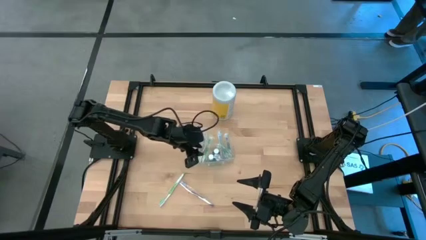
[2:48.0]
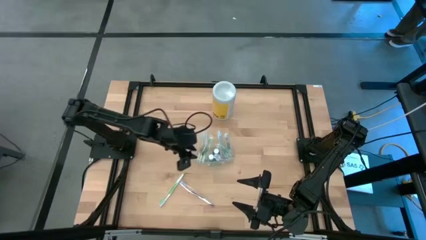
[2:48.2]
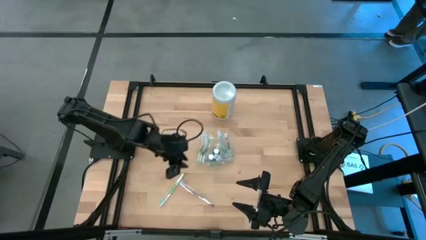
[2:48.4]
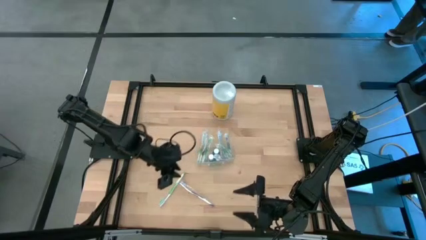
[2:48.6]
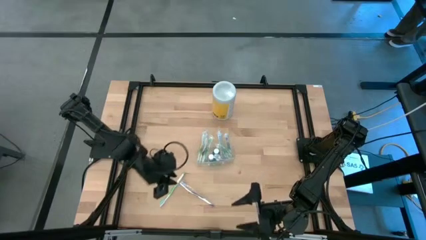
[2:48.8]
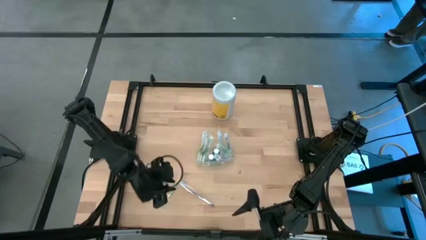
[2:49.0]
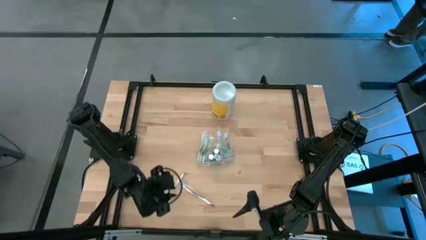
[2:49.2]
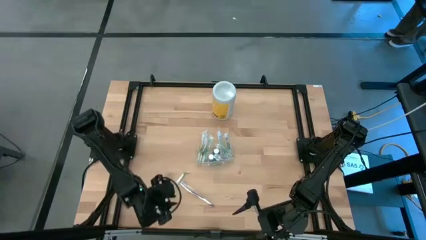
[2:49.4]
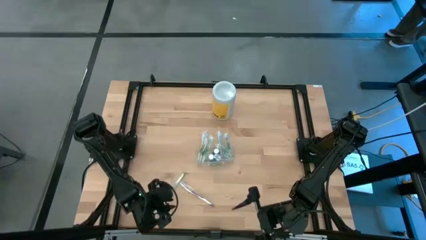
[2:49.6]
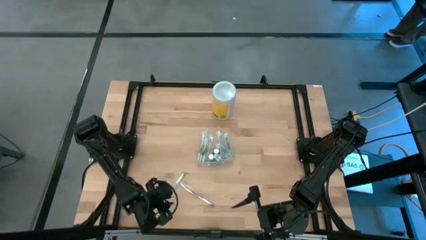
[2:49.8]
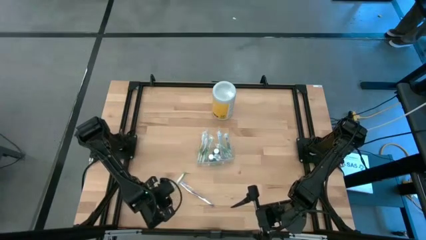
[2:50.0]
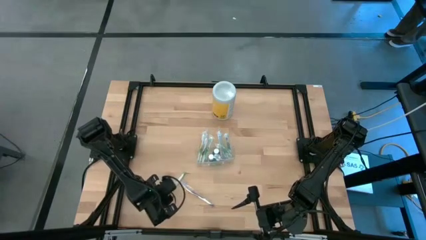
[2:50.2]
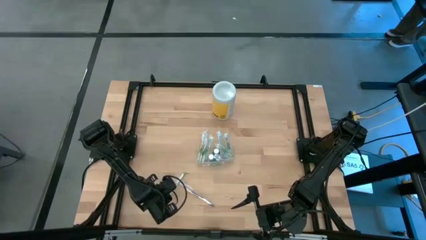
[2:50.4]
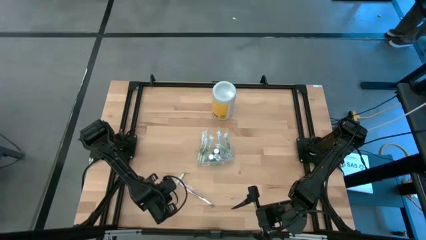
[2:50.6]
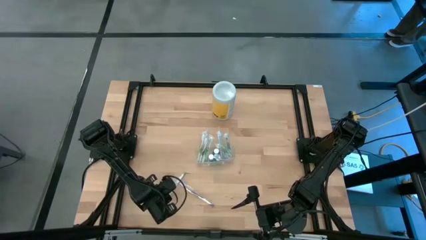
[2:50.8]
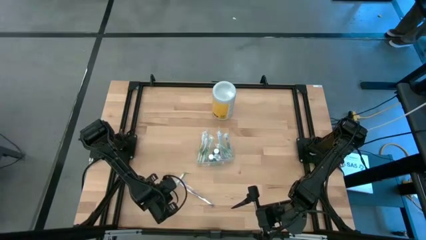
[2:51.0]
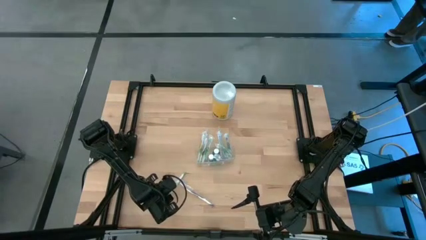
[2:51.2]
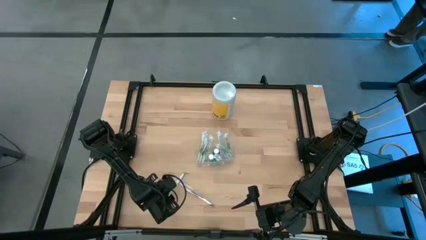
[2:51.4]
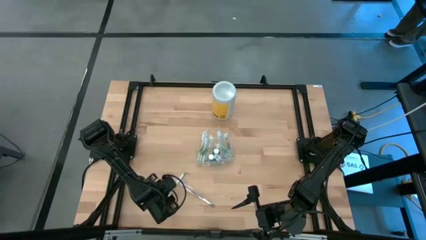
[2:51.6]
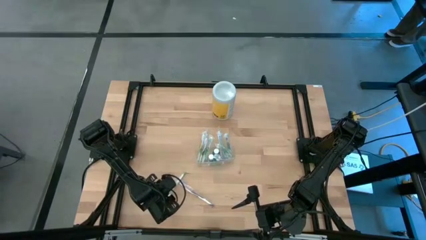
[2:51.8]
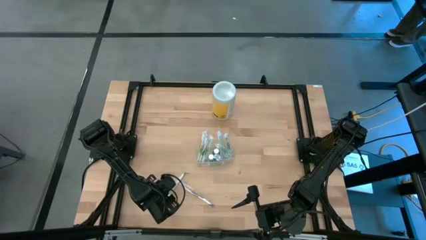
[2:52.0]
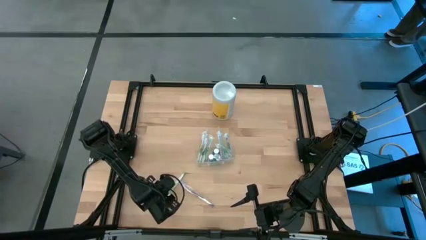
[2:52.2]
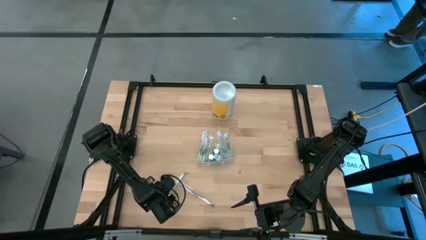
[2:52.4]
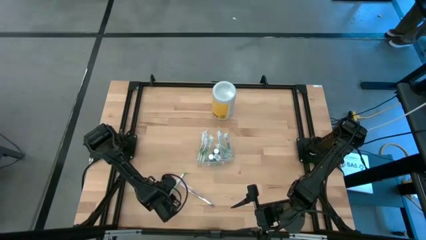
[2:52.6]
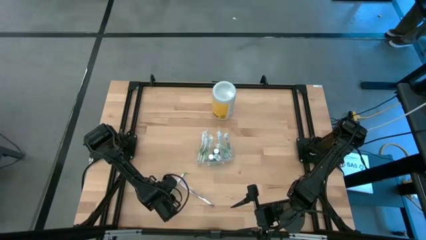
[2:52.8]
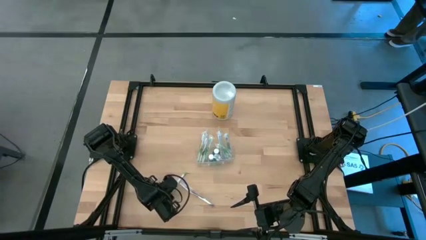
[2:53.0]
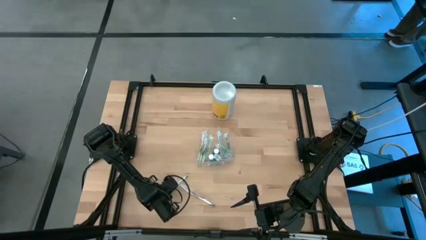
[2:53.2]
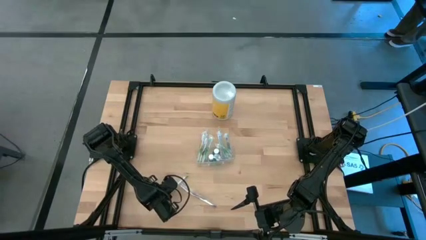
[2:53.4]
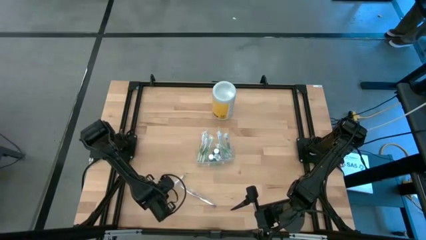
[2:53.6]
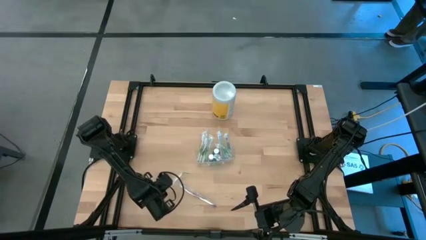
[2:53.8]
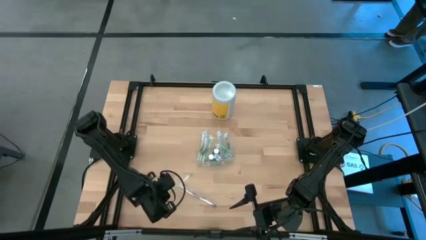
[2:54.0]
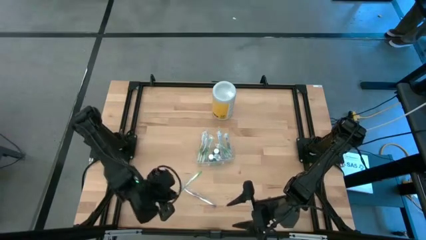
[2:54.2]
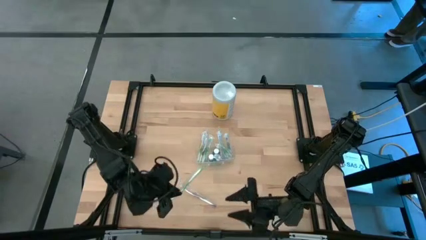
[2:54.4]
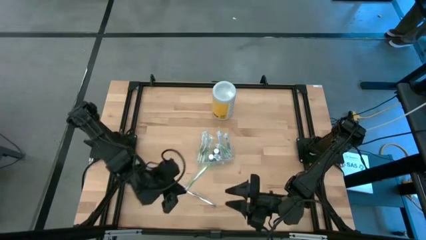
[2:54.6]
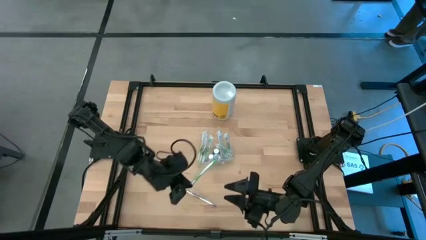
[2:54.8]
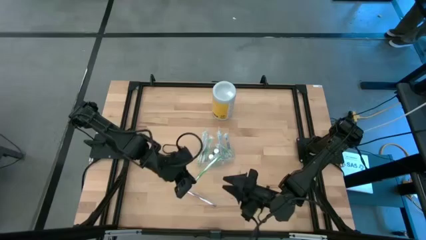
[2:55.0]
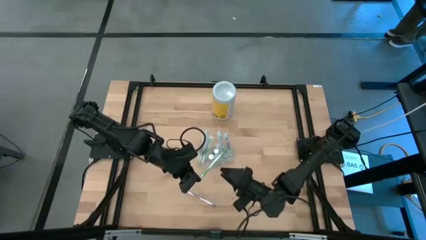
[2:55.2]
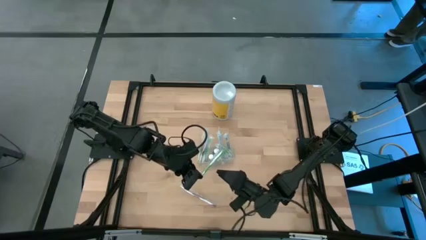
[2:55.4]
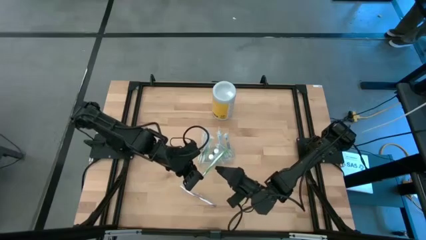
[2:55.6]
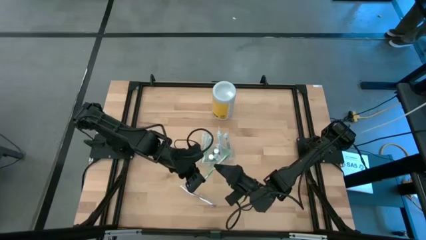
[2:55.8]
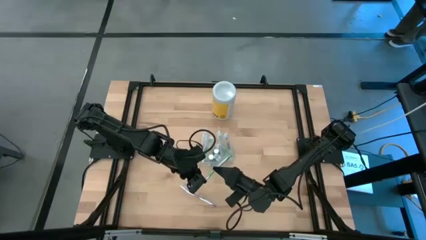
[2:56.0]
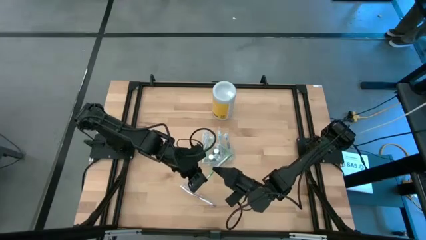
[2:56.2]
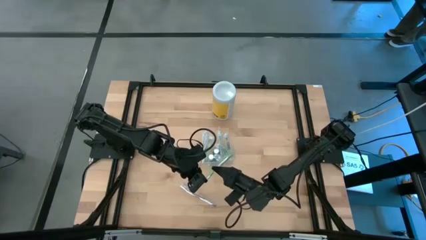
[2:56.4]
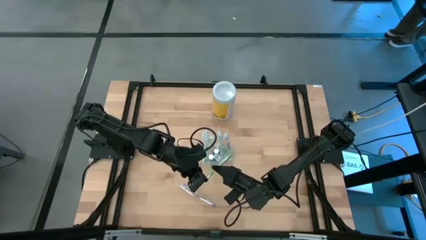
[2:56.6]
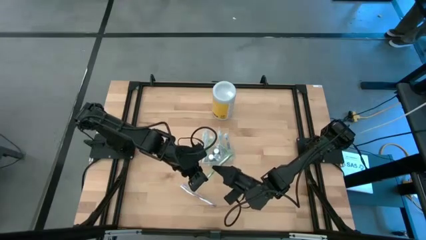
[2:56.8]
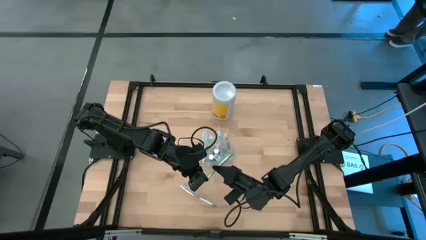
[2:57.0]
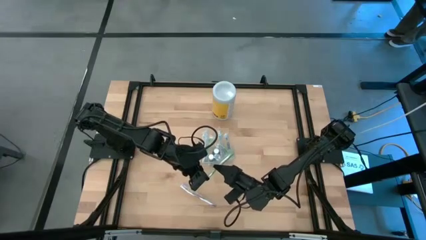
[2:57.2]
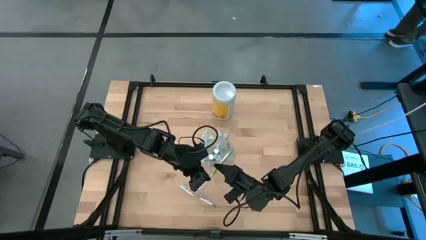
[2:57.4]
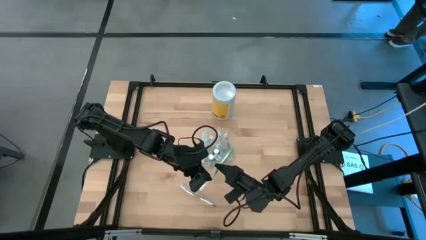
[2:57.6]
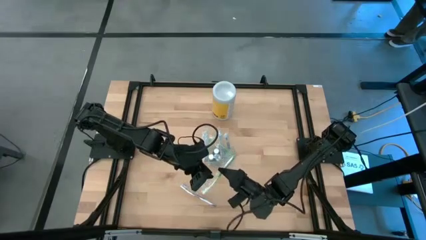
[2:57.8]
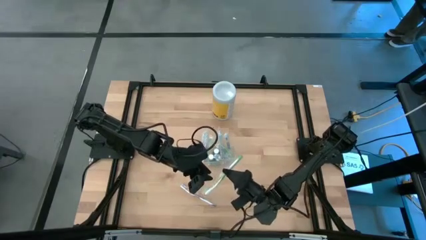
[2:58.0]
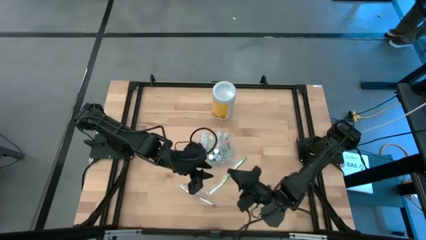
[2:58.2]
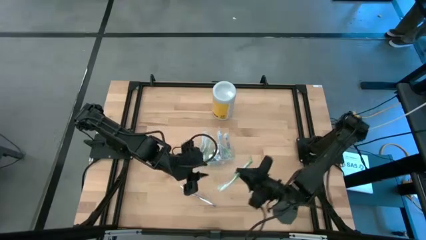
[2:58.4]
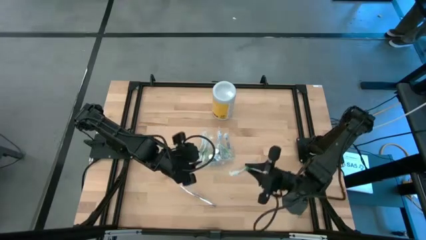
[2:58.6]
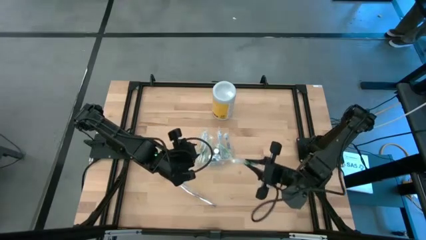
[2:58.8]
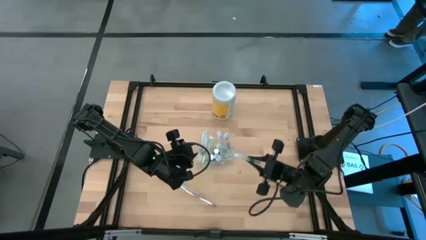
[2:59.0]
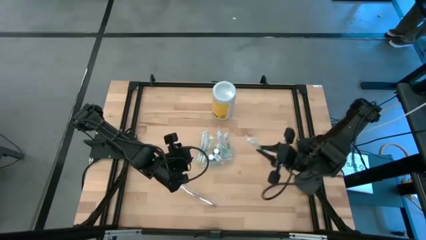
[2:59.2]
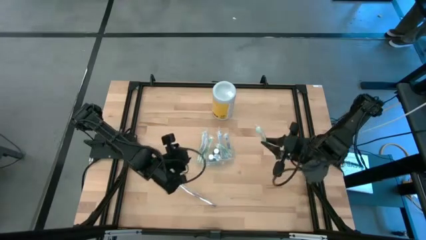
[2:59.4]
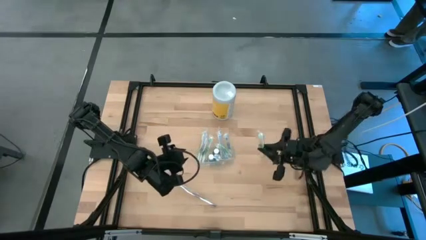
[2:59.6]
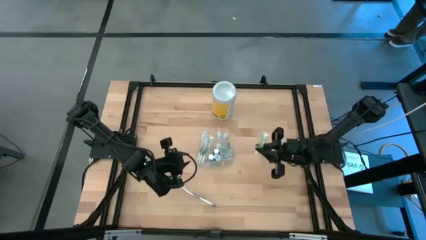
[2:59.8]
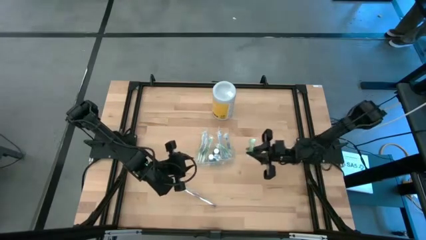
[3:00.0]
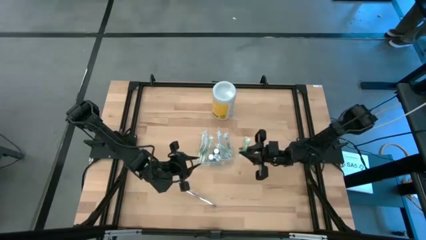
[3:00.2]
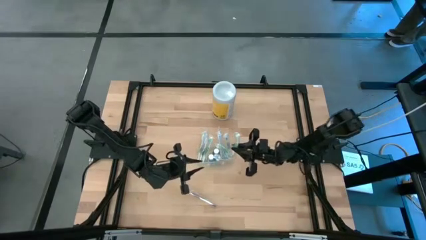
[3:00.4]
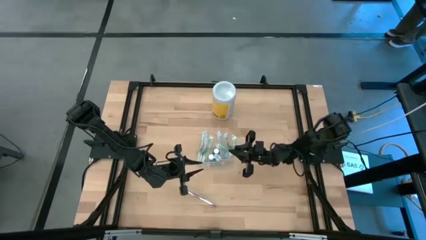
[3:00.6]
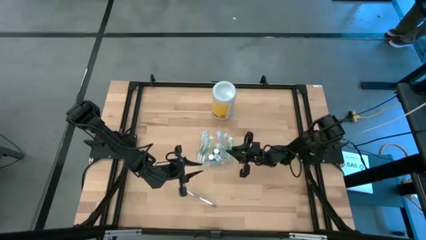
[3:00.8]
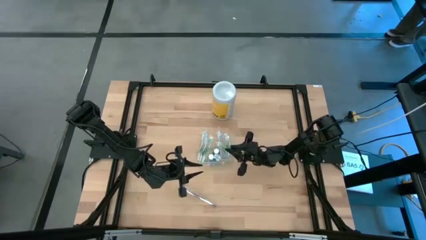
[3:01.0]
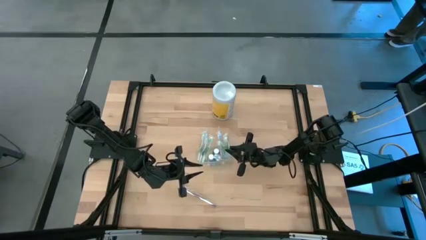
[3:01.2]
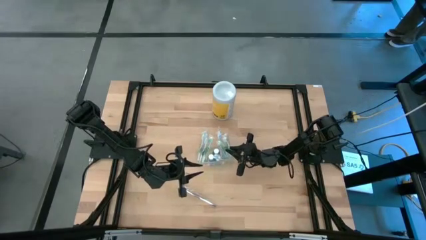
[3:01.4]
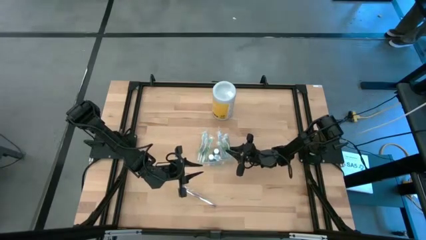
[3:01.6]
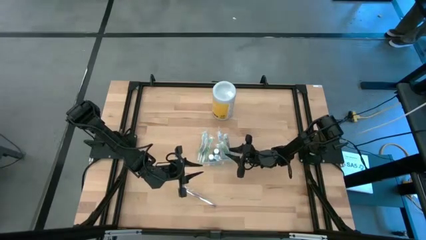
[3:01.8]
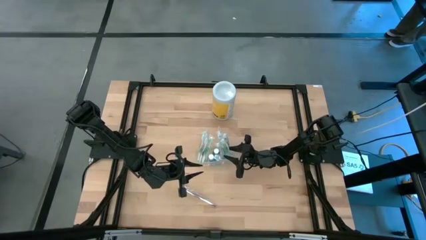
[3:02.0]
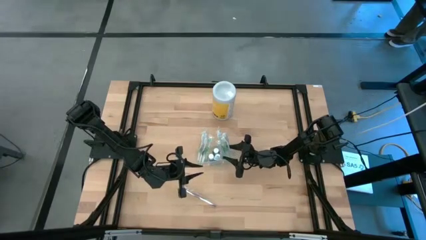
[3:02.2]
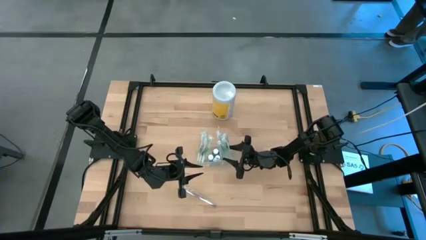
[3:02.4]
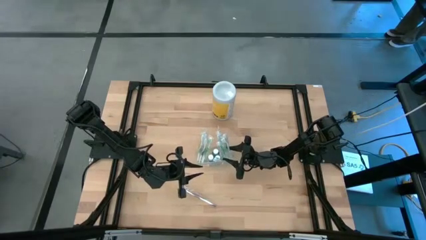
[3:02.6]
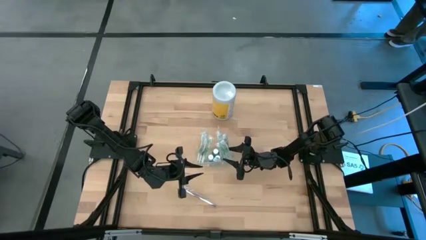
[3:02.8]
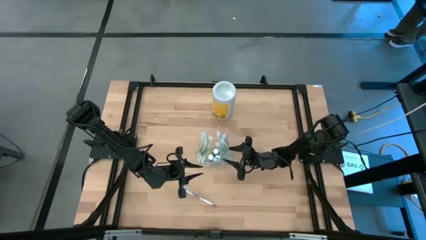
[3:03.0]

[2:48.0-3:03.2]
Task: Pick & Place toothbrushing station
Put the green toothbrush into the transparent organizer
